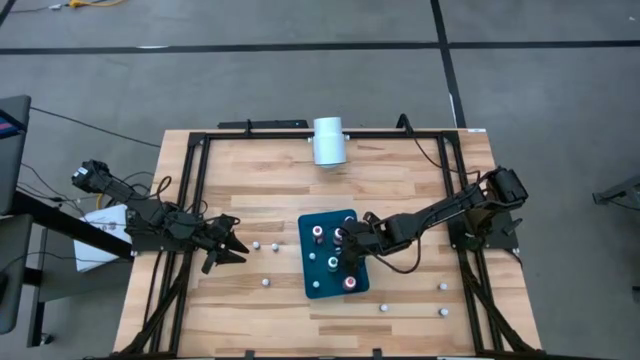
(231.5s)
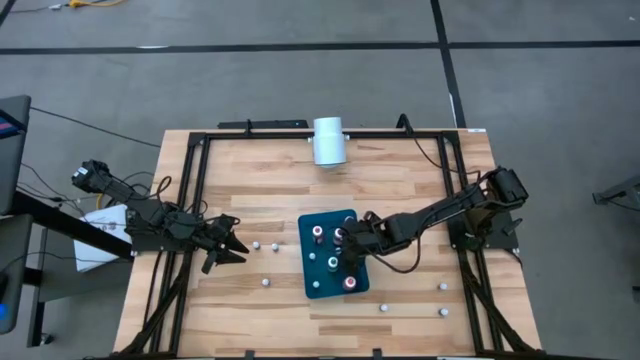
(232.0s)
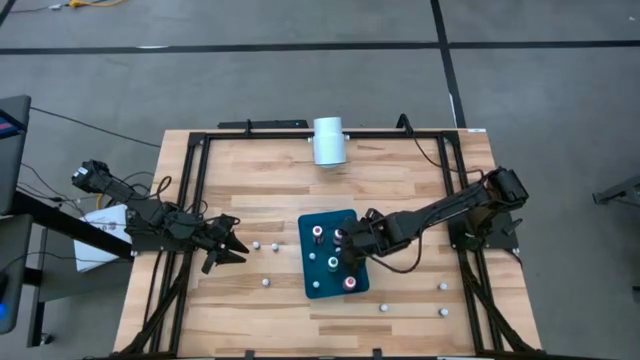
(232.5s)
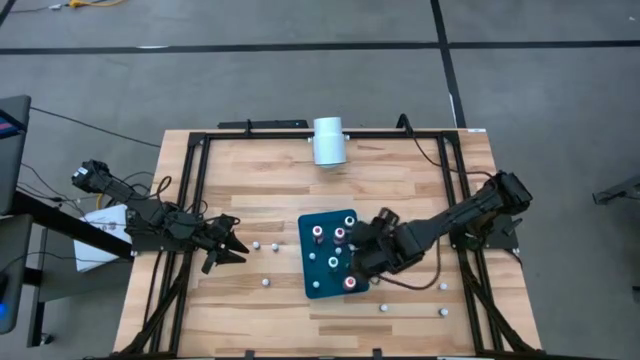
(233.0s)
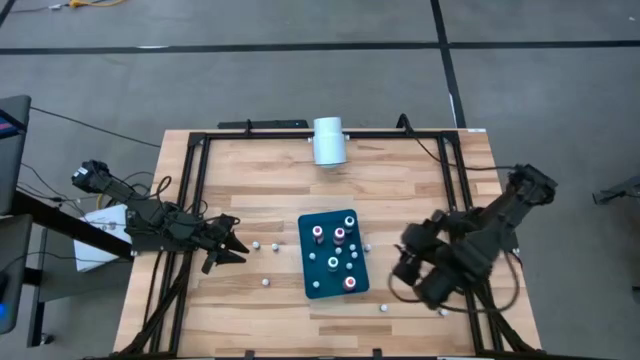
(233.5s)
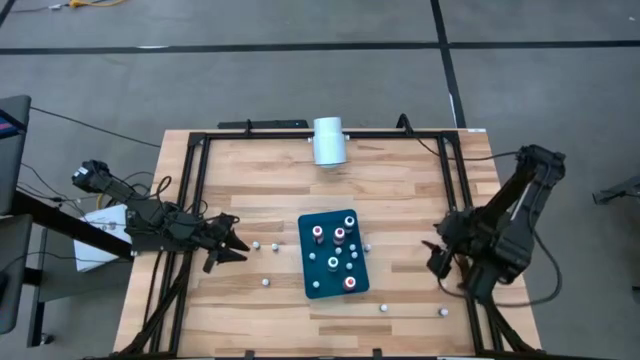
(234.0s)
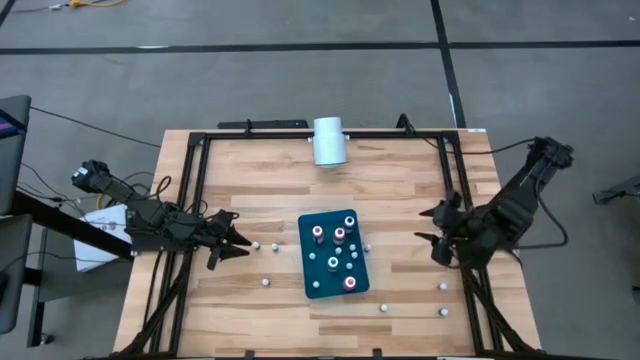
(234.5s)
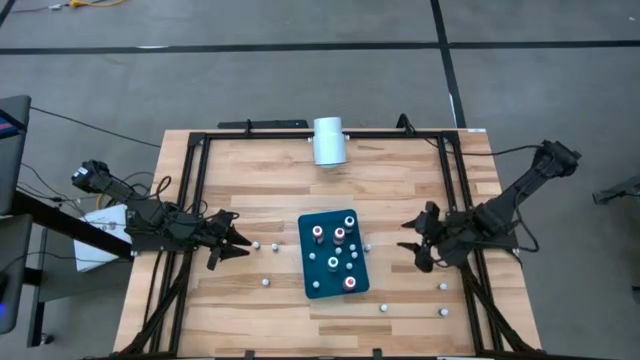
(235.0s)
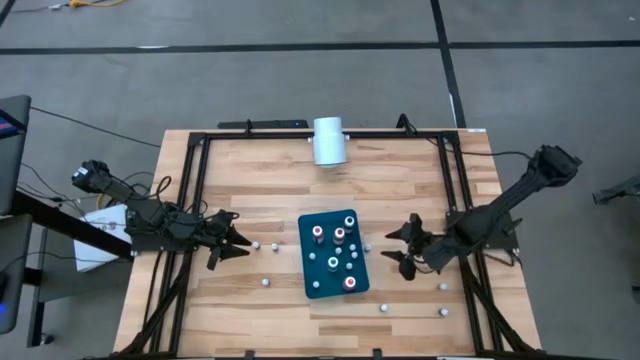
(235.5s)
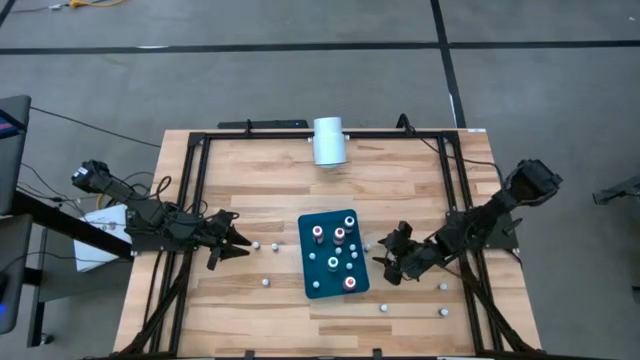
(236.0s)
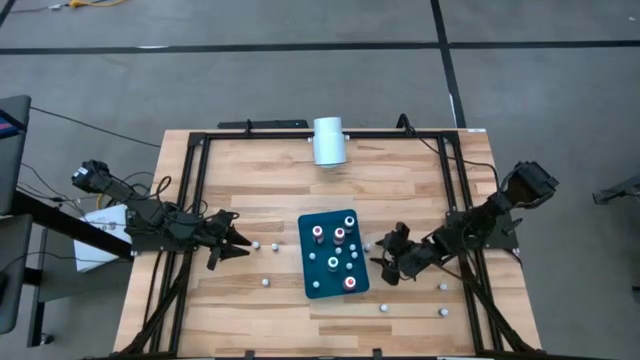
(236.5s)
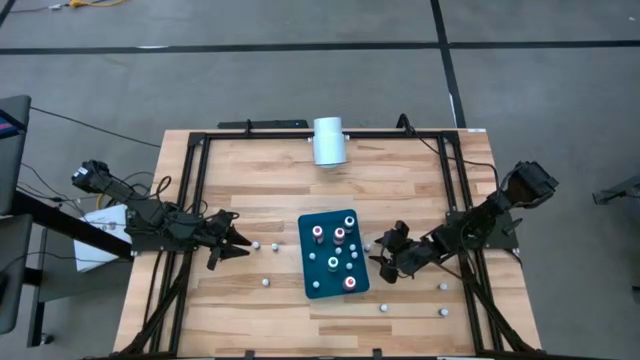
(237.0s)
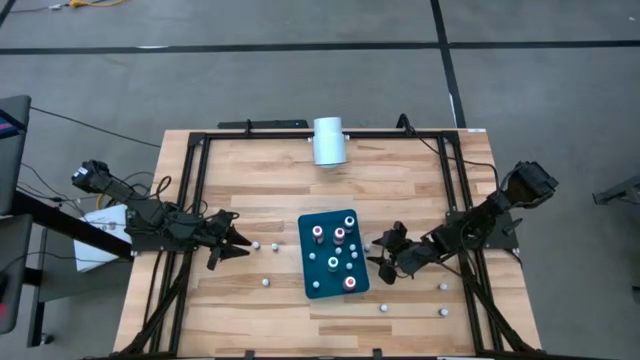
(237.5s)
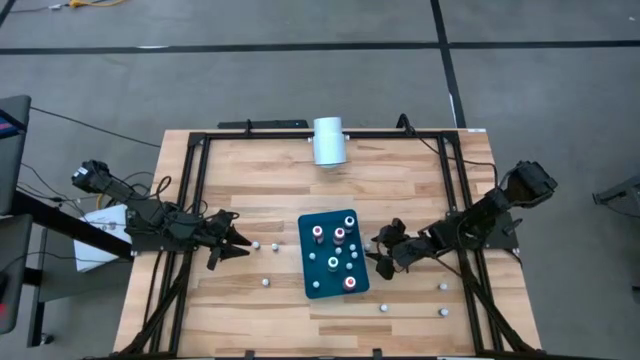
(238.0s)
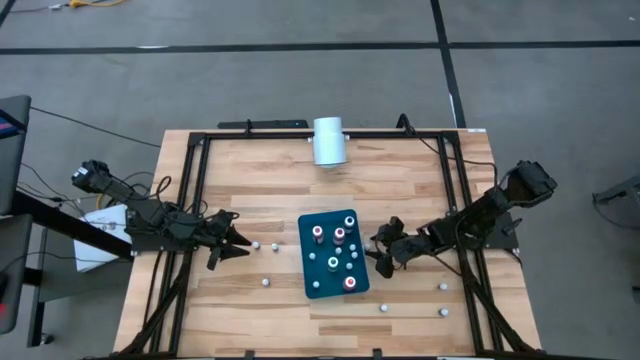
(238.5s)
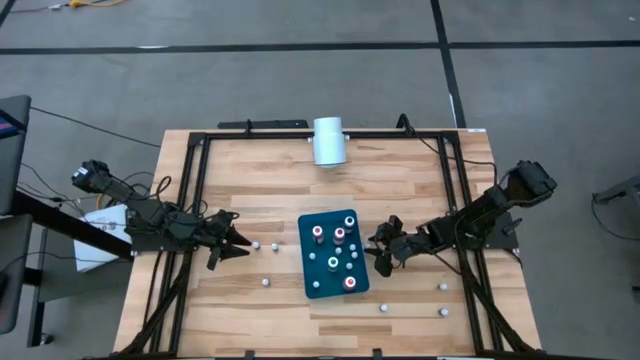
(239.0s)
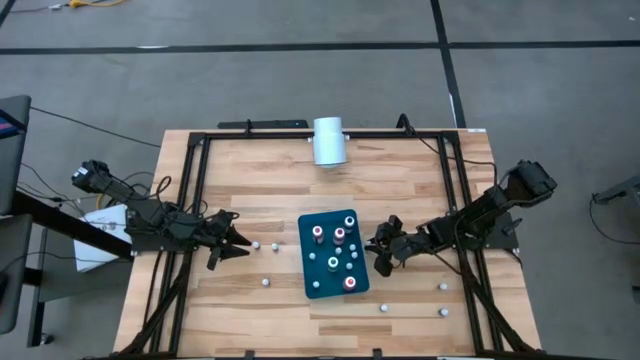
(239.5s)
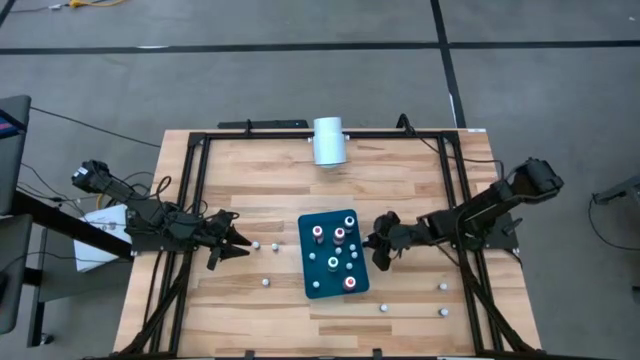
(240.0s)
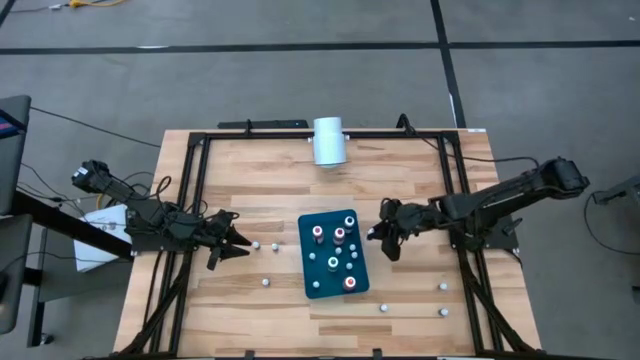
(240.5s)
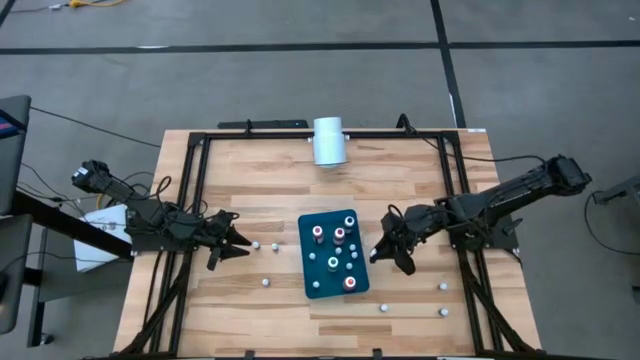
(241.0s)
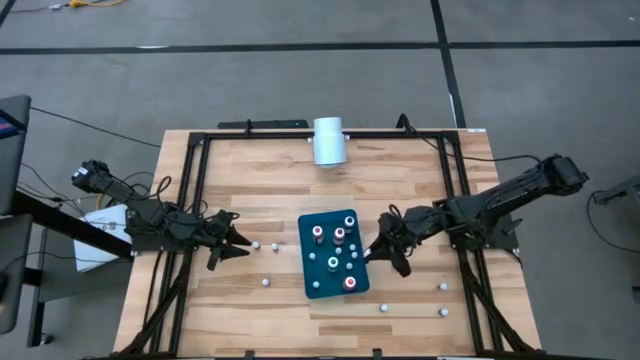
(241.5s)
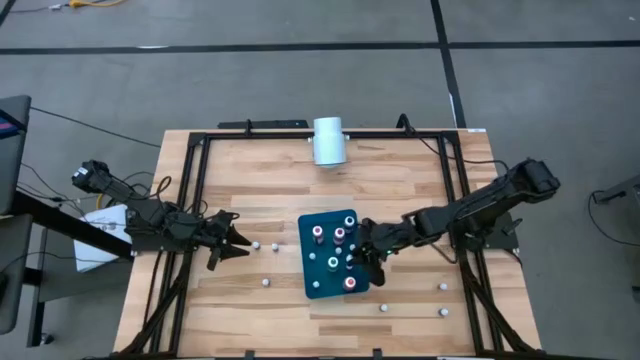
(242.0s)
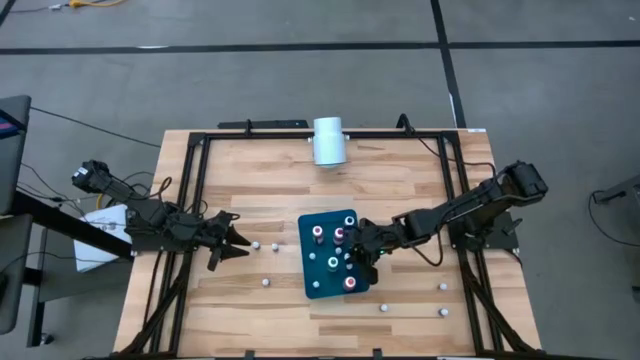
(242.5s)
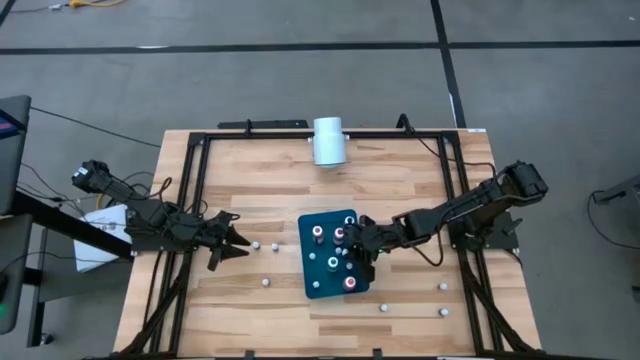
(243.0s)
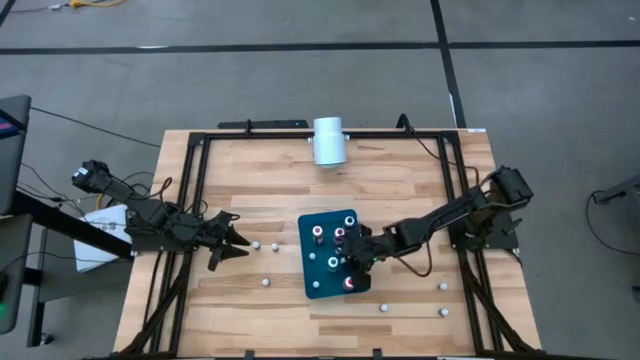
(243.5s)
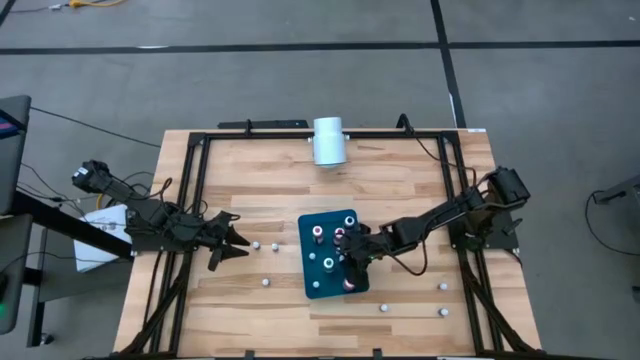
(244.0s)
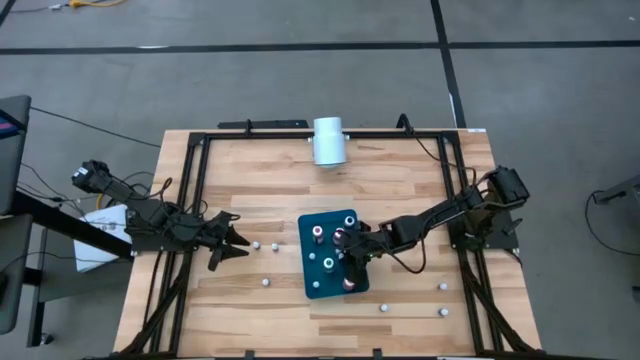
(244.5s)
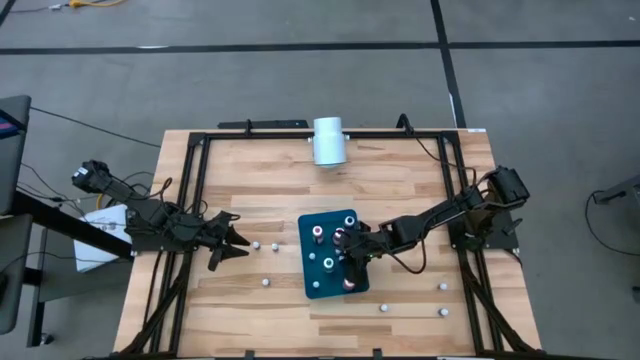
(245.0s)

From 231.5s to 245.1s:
Task: Pick & Place food coloring
Put the small brown food coloring bottle into the blue bin

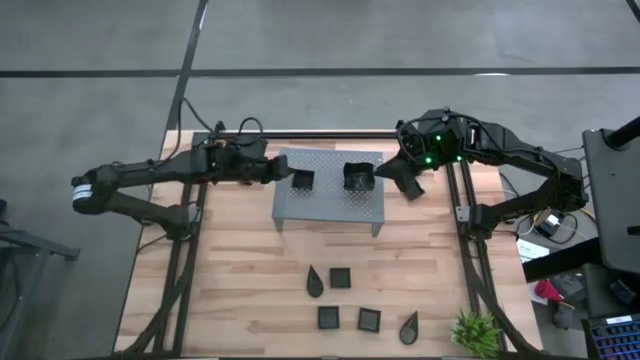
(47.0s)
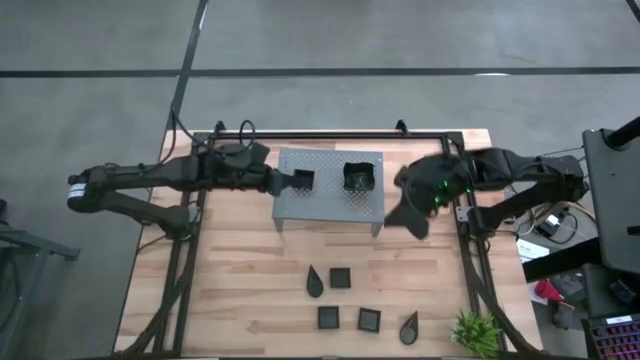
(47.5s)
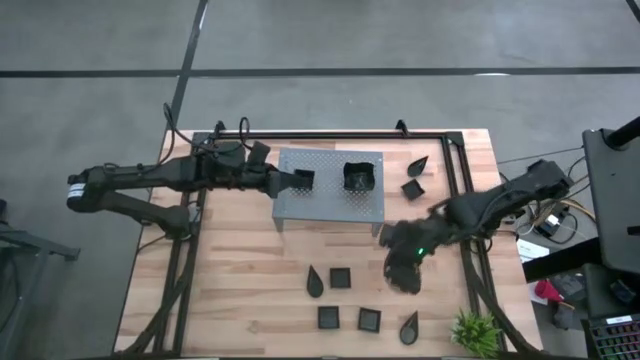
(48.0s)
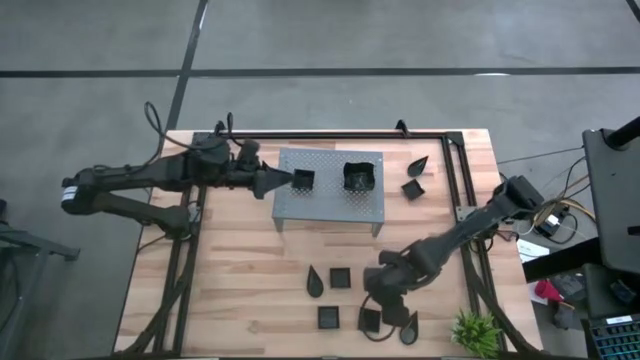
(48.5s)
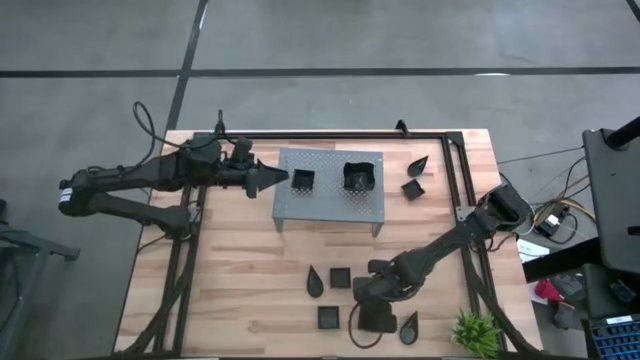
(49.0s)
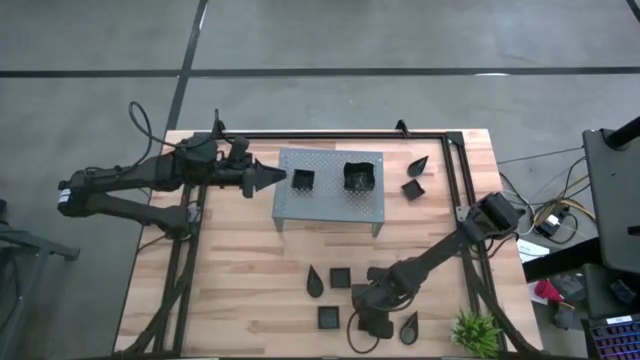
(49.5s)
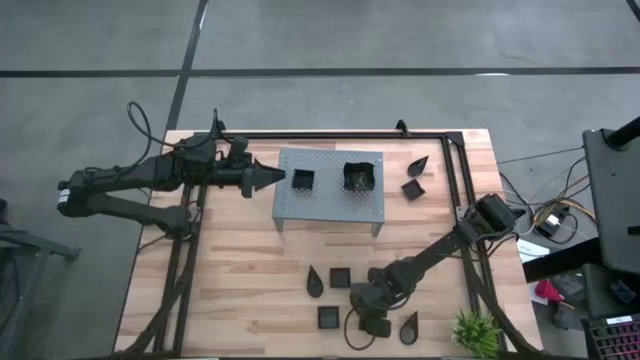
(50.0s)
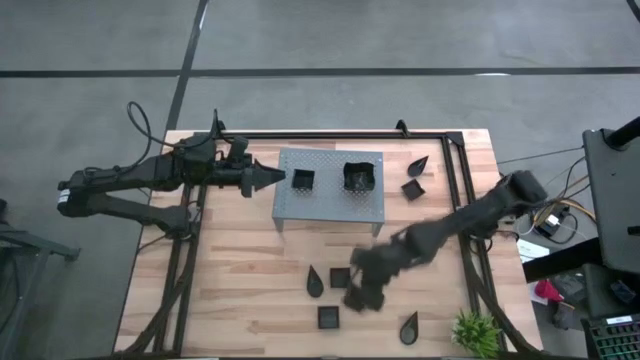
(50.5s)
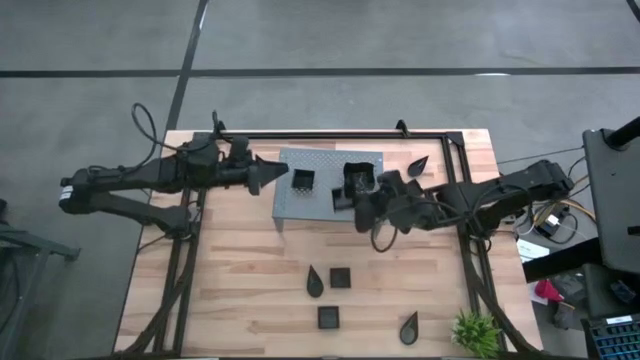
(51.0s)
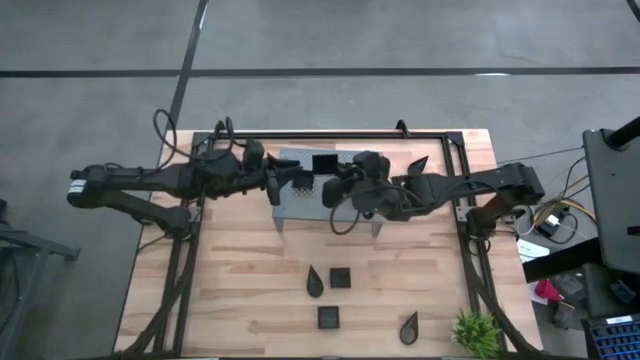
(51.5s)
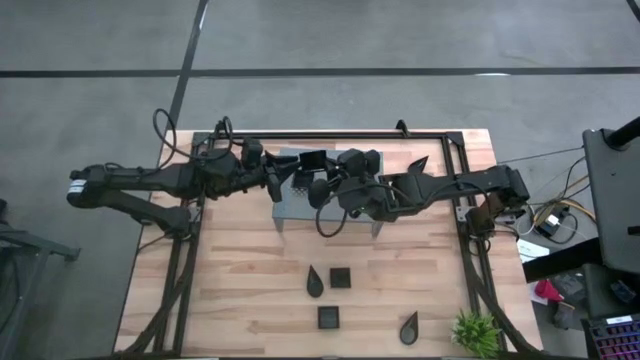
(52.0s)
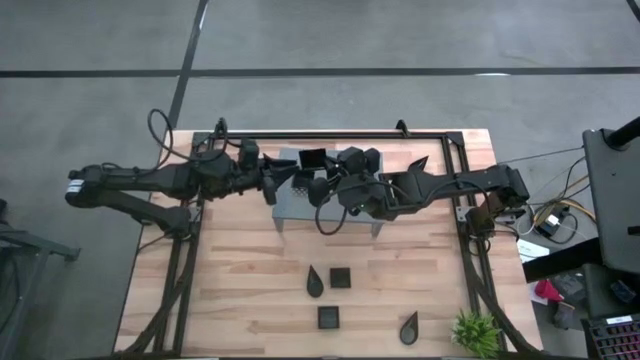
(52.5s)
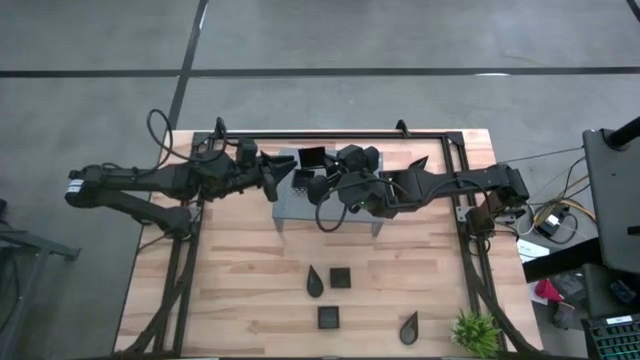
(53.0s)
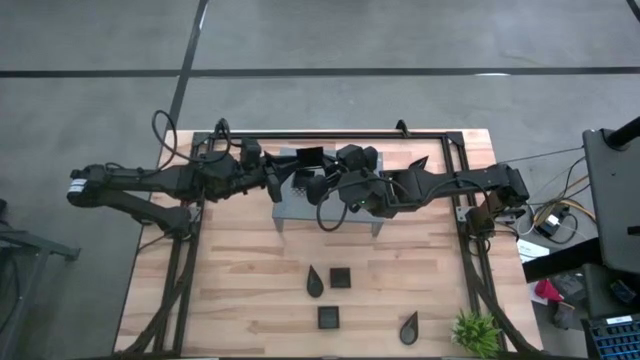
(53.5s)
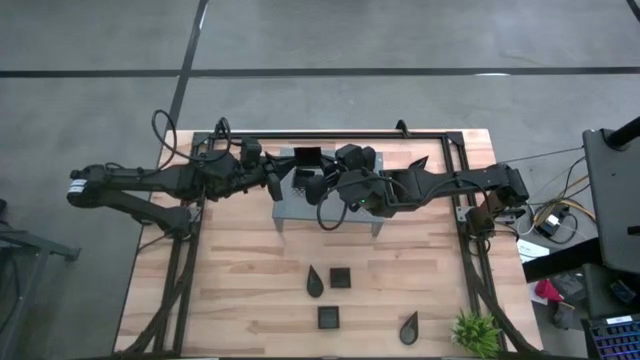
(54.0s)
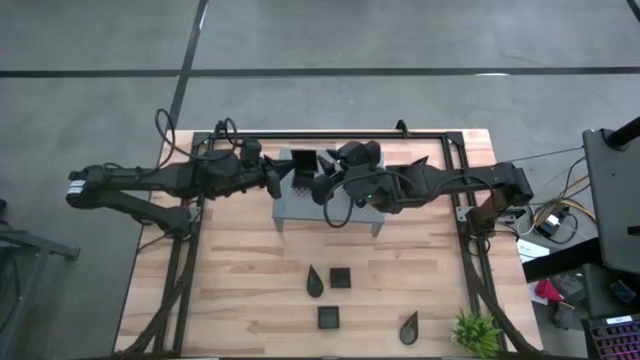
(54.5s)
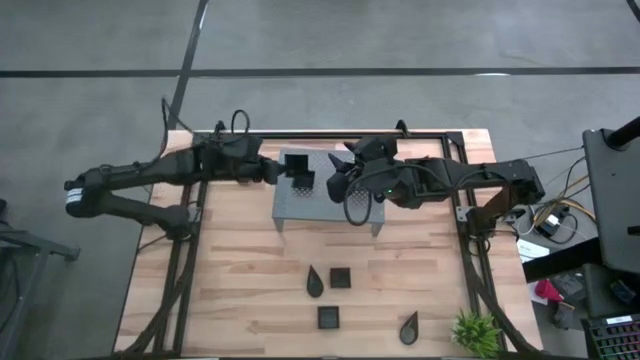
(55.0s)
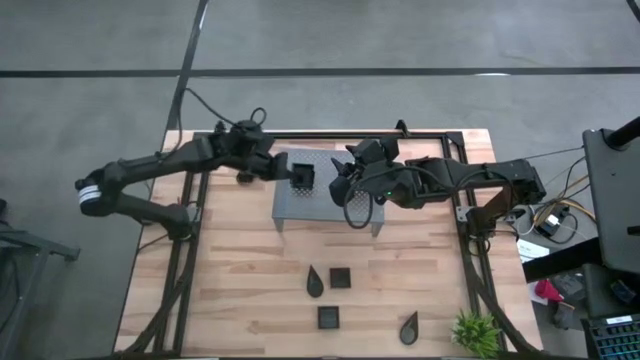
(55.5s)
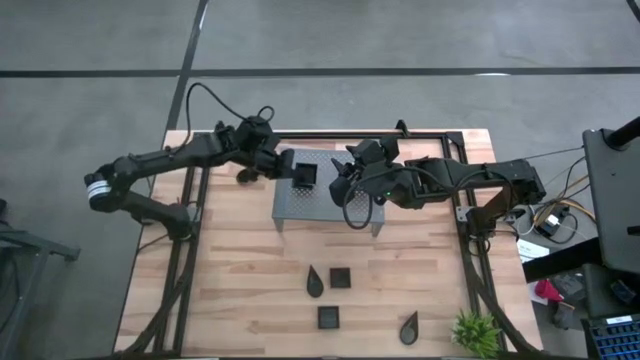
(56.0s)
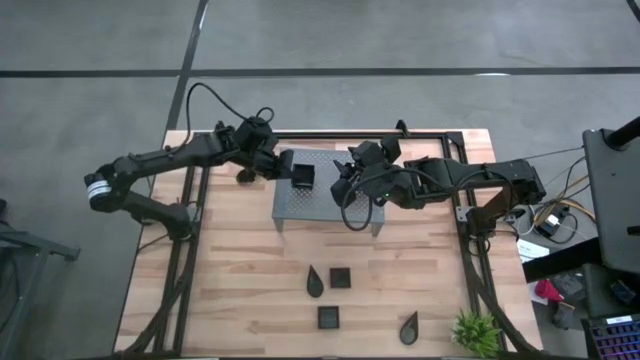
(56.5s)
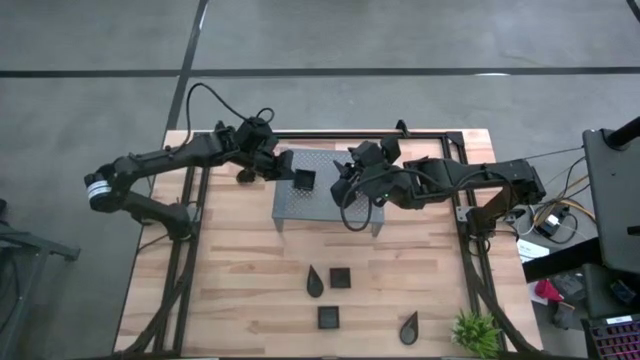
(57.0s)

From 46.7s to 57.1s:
Task: Pick & Place Mini shaped plates
Stack the black square plate on top of the other black square plate on the shelf
